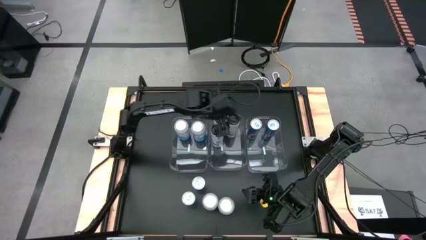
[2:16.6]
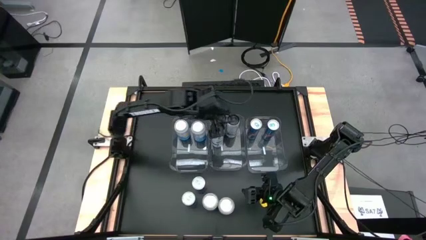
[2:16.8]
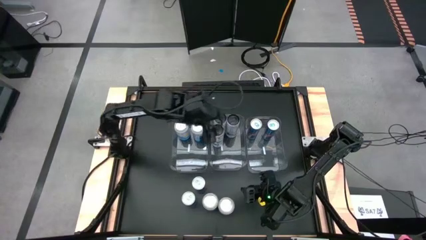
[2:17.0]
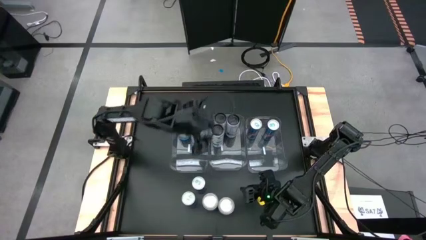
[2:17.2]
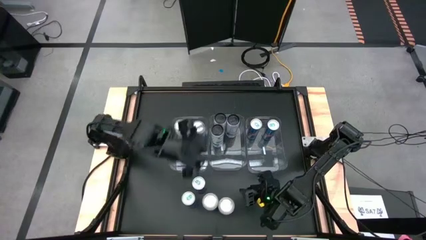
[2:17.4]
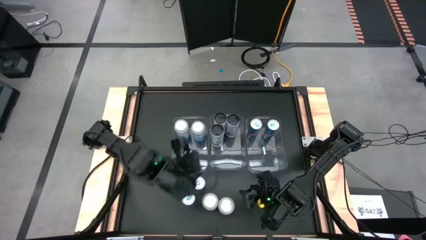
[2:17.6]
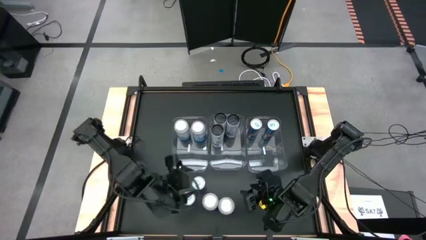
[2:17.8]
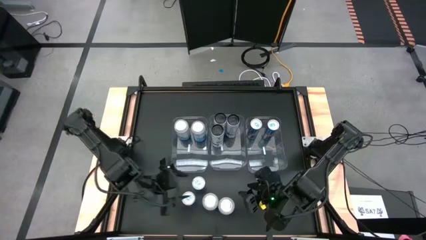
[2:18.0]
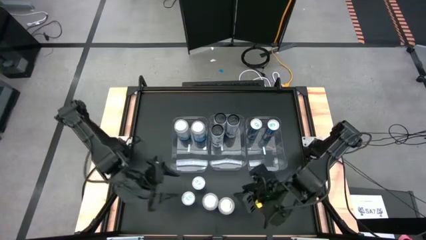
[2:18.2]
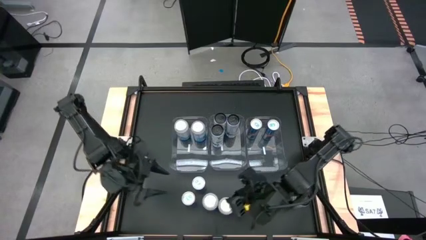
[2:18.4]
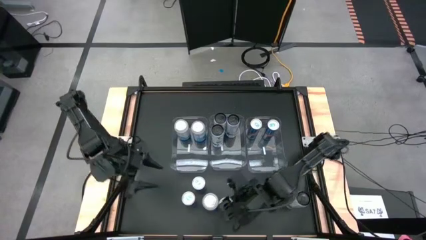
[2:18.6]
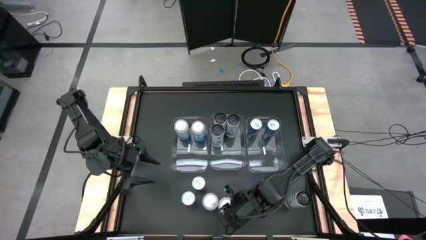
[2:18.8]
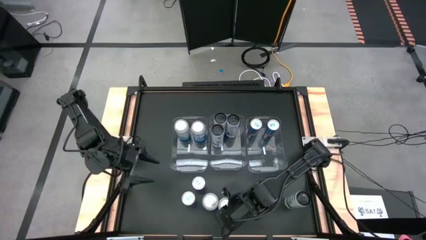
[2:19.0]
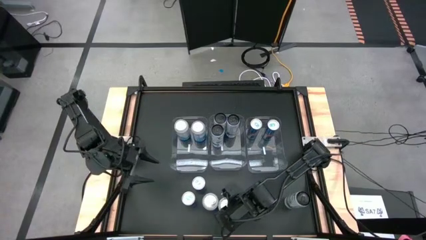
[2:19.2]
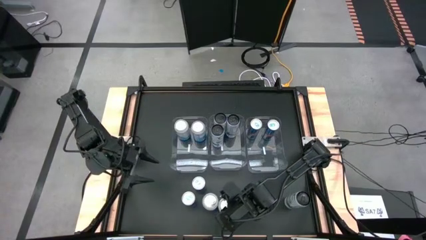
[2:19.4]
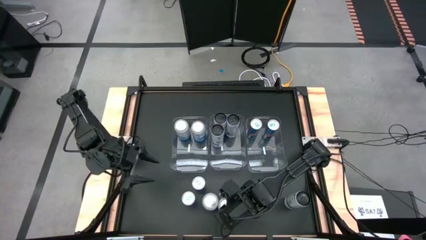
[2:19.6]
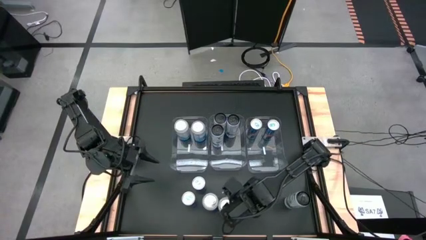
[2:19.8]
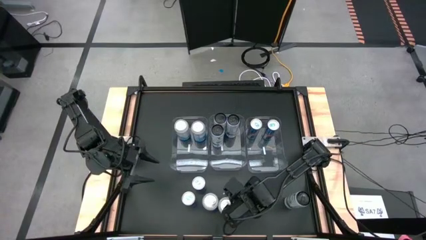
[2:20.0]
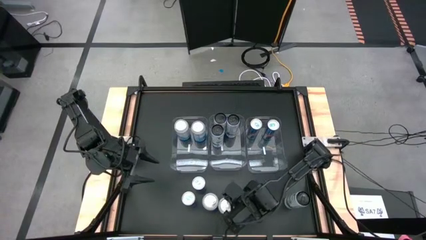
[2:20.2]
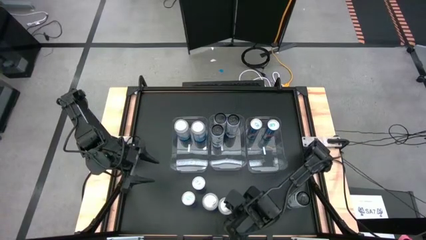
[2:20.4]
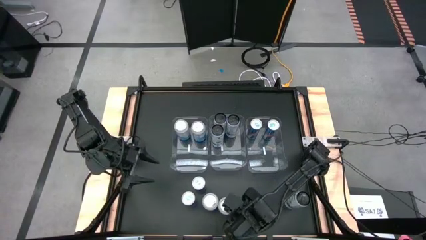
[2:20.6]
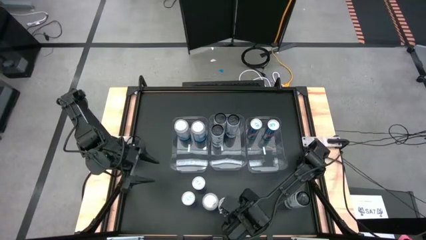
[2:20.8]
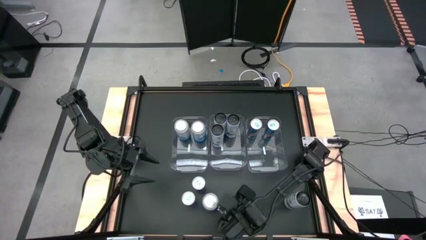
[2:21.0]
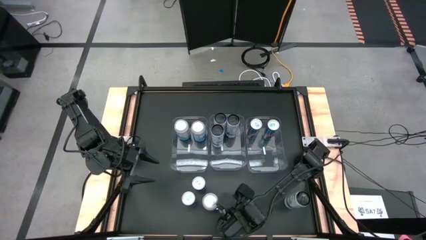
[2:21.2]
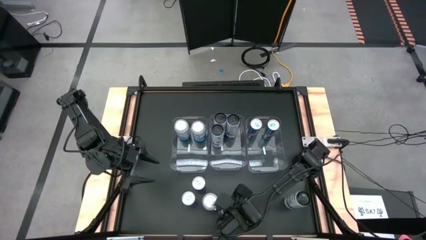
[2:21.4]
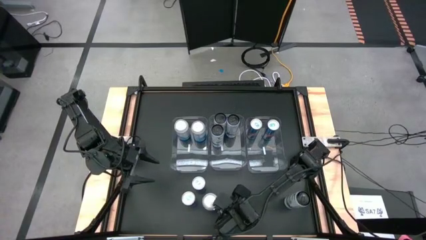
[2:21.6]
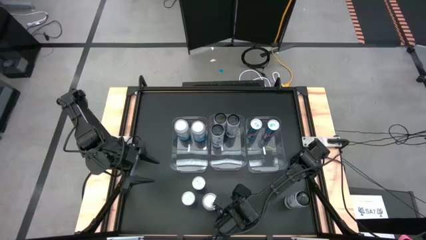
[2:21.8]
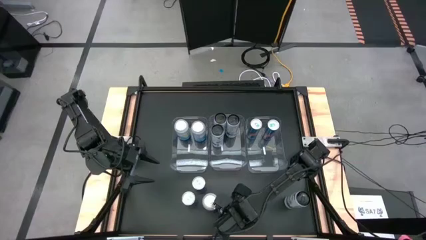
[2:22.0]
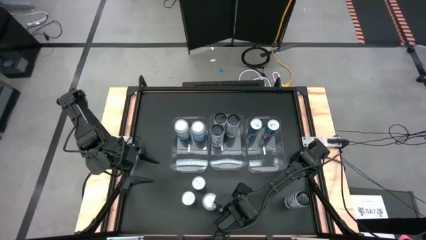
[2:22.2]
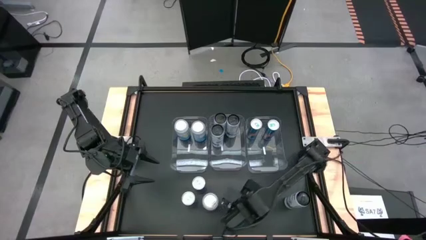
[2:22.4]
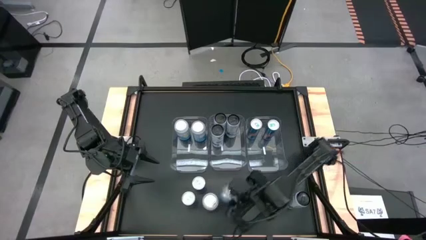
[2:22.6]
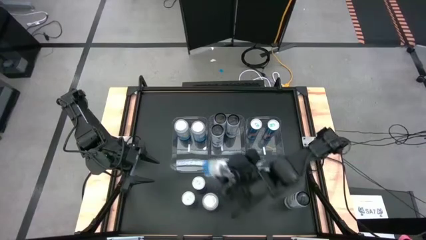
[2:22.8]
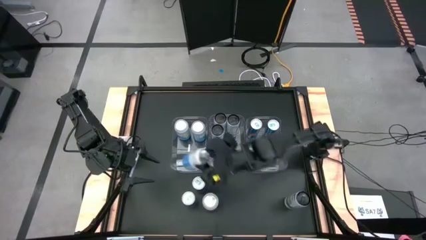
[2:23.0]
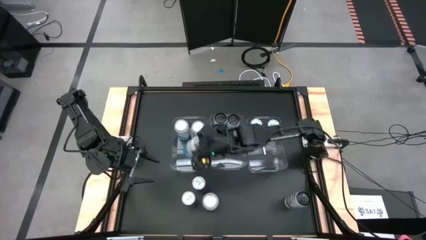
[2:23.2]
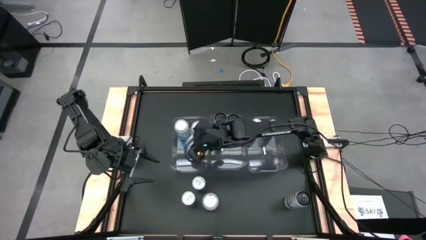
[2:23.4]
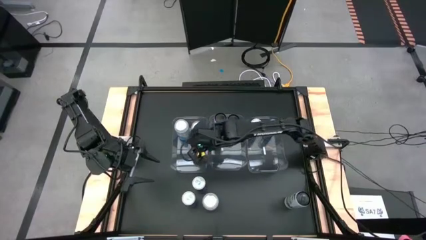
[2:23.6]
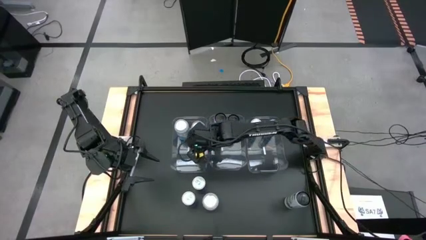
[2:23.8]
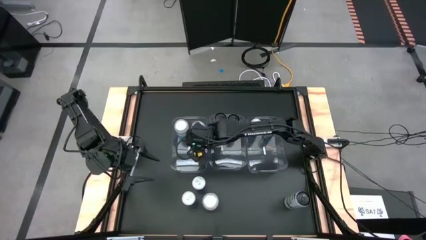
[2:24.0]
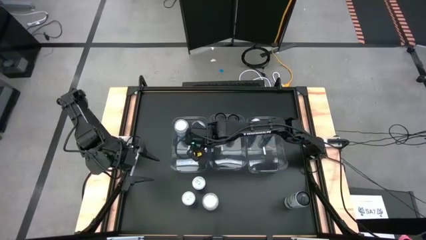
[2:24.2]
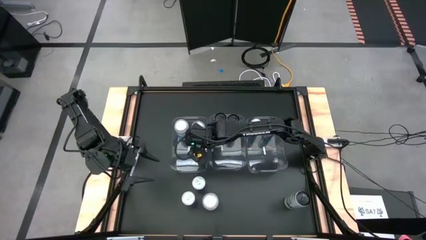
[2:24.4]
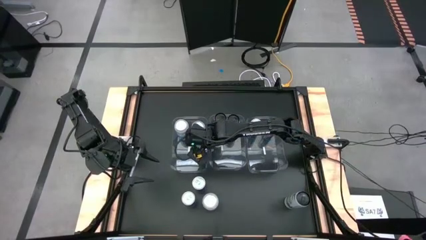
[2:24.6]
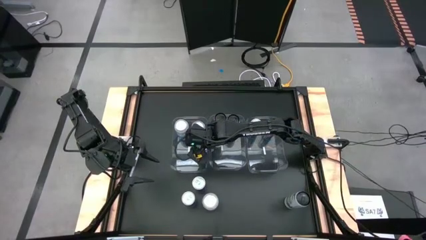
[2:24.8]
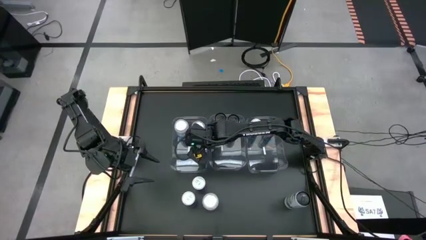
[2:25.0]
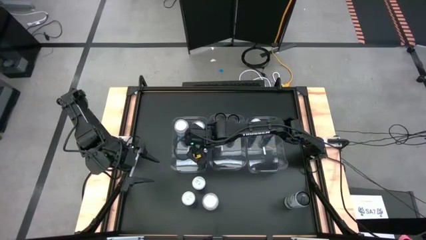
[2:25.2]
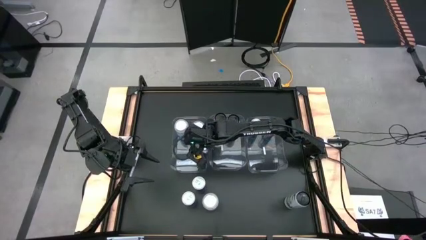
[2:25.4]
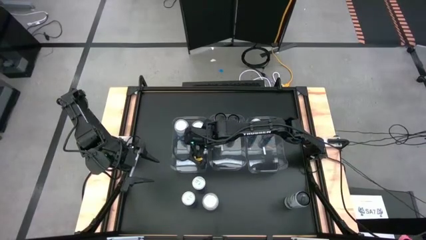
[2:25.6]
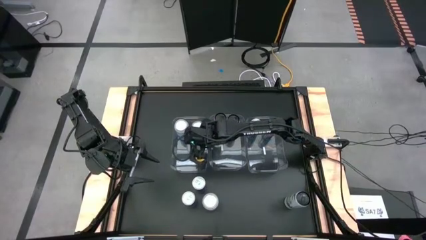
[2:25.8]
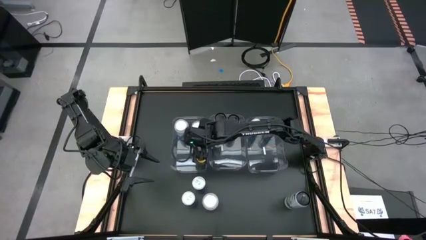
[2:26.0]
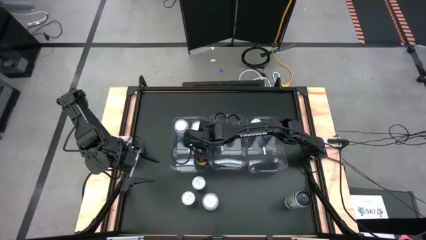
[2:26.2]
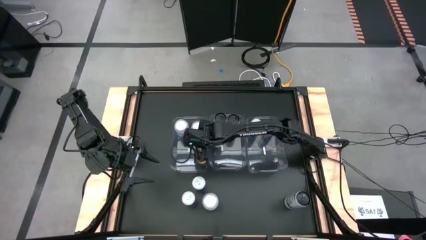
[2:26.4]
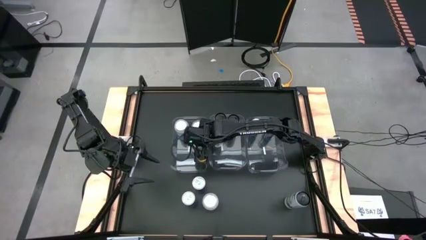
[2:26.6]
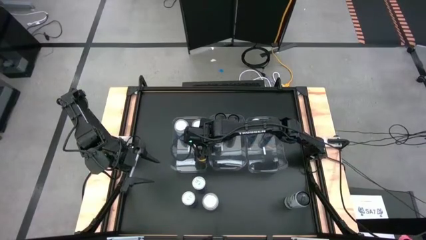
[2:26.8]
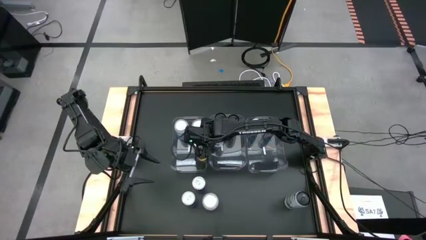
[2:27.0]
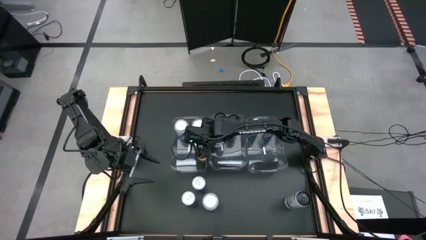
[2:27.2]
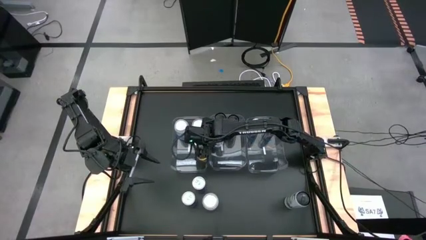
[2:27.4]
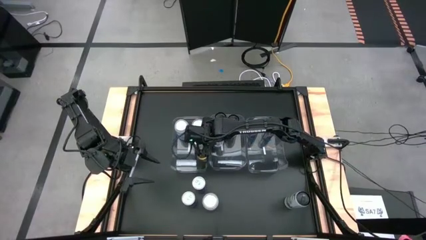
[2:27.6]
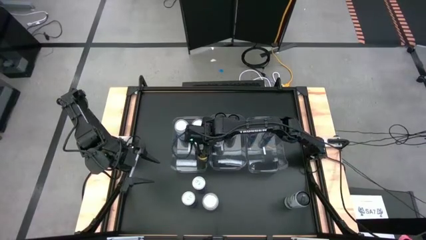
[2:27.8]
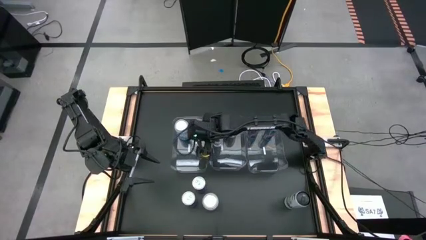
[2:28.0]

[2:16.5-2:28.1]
Task: Sort soda cans
Put the right blue-white soda can into the left transparent bin

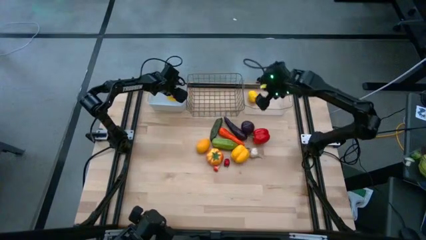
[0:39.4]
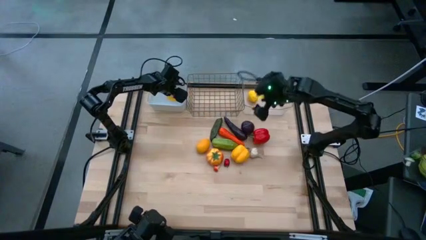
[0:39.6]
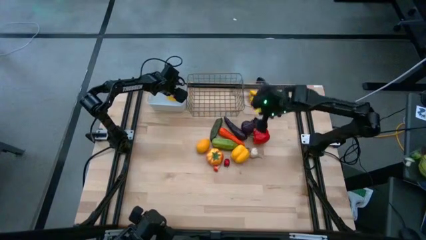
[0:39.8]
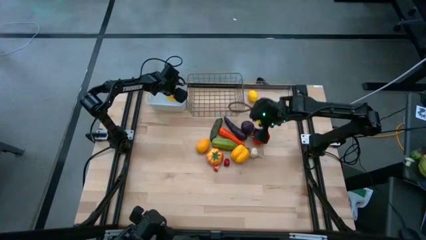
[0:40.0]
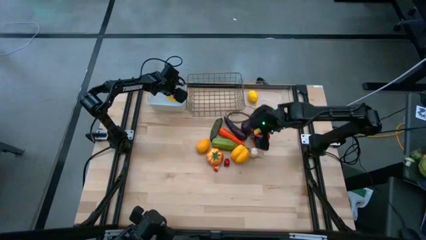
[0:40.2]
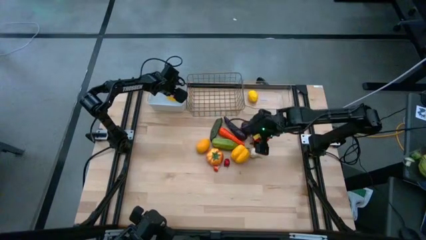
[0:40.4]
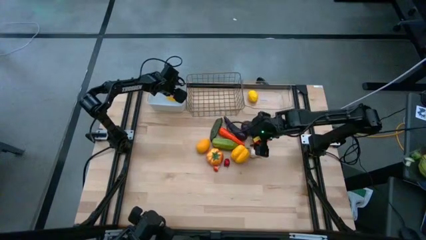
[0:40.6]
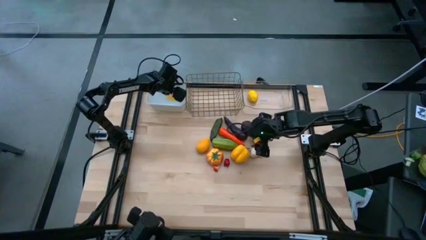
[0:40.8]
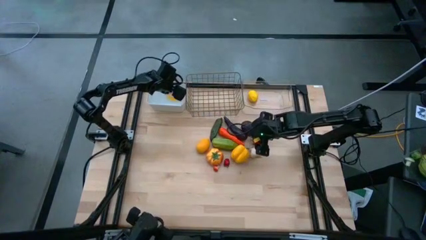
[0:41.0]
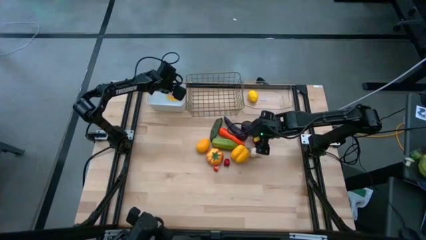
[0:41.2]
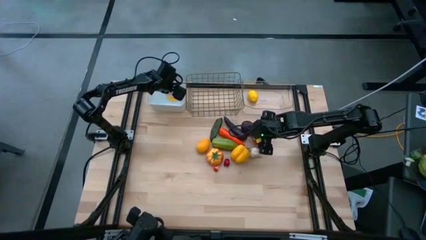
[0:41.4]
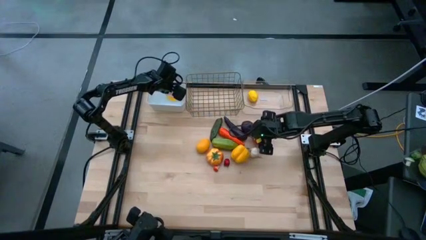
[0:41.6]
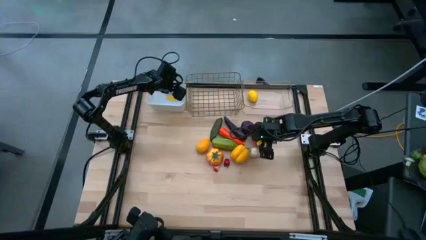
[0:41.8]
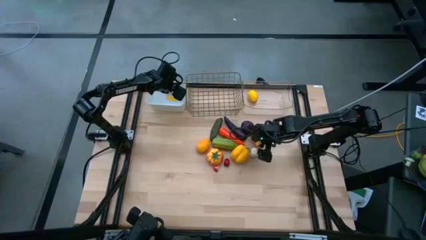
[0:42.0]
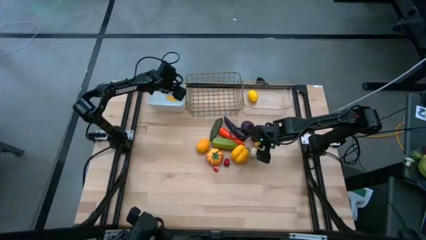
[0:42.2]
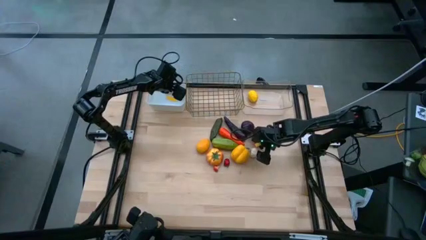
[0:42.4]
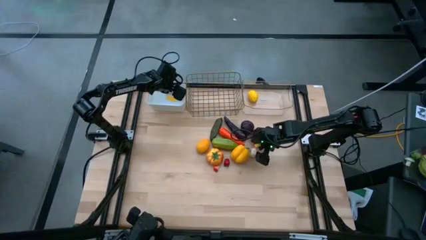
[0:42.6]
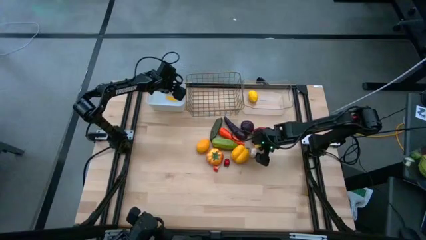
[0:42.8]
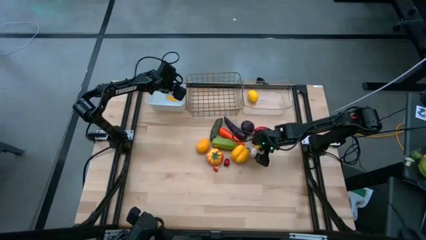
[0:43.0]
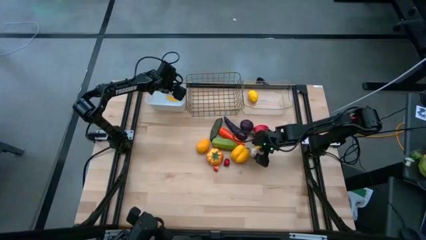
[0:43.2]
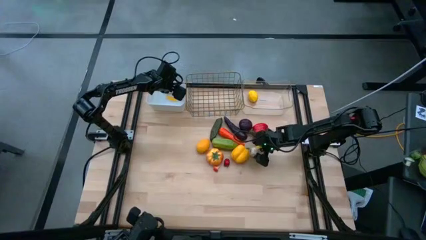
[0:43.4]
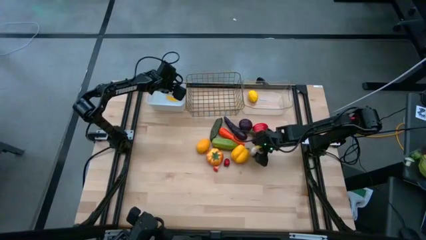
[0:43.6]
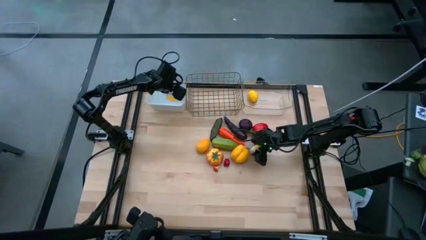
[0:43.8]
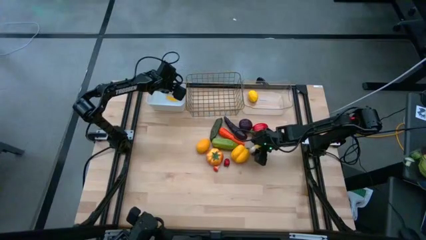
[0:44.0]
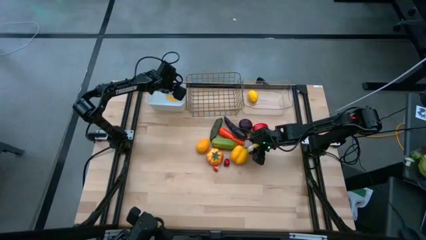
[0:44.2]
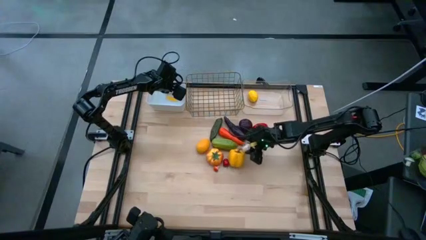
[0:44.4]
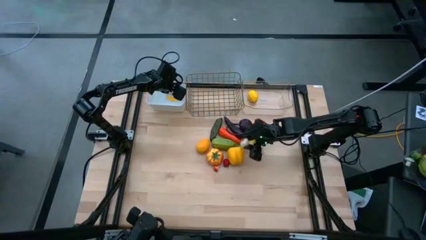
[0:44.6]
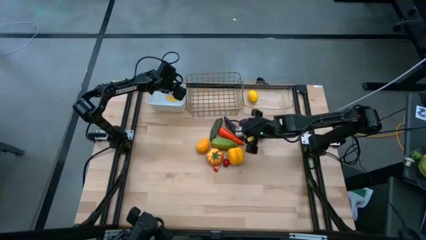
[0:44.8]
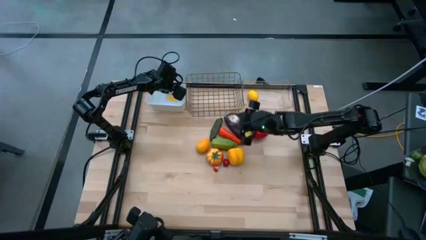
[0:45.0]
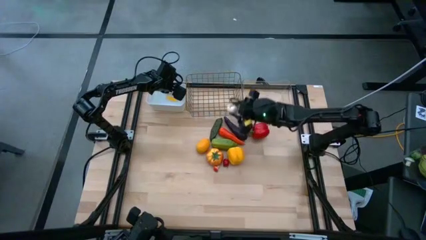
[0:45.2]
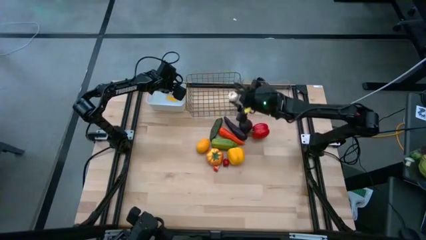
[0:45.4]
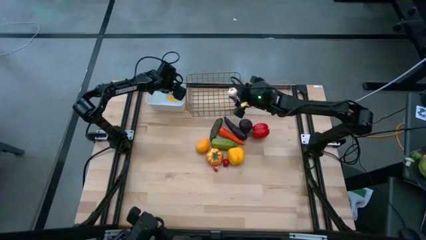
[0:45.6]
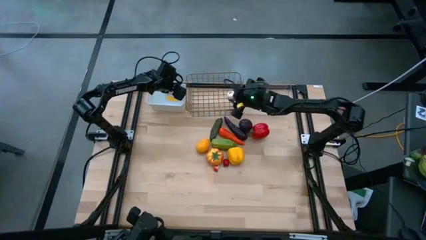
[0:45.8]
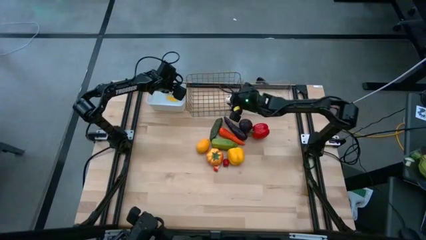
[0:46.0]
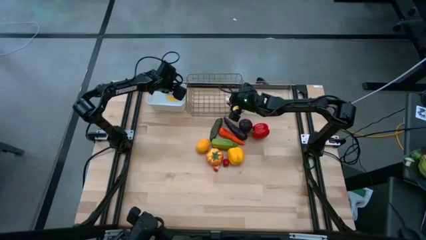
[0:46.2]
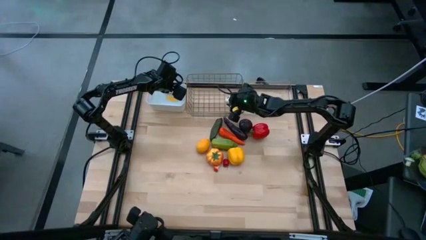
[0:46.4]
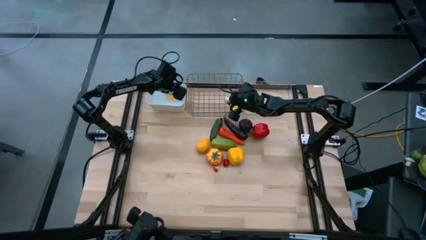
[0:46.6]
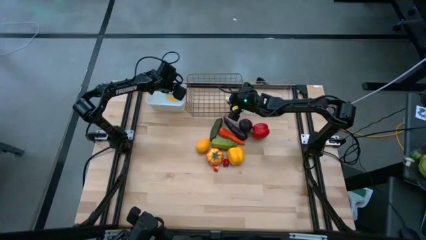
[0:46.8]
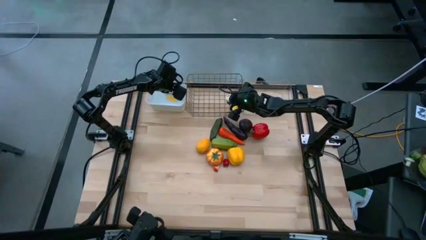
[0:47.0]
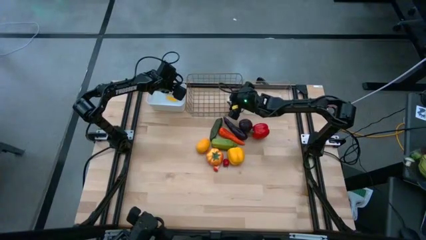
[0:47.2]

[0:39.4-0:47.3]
Task: Sort produce into baskets
Put the garlic into the wire basket
